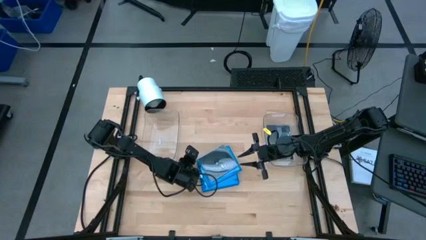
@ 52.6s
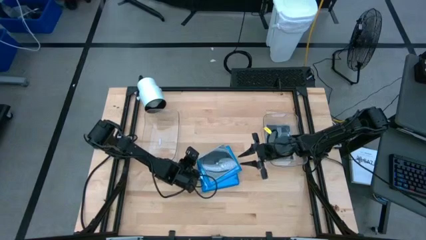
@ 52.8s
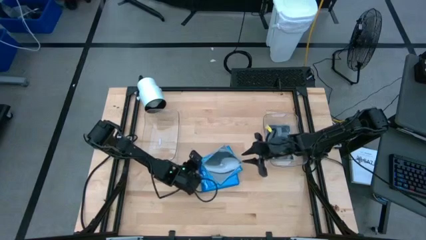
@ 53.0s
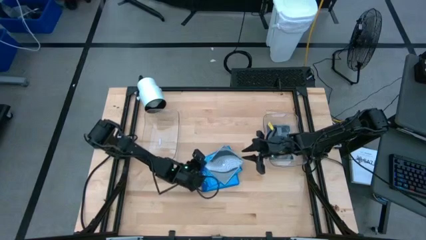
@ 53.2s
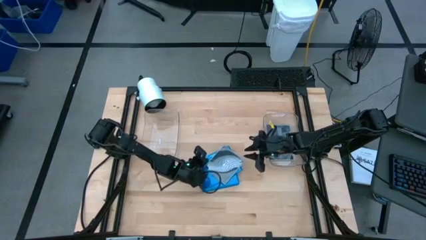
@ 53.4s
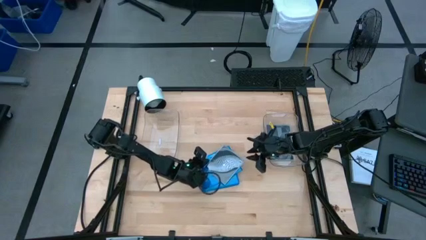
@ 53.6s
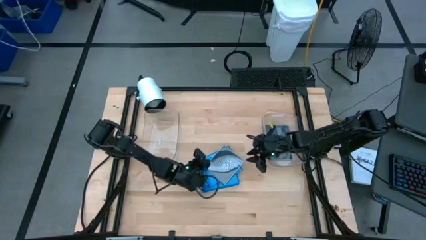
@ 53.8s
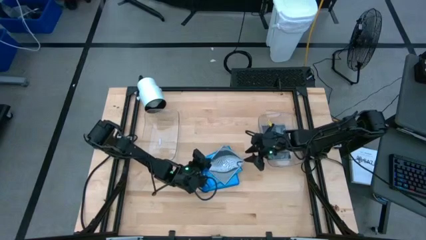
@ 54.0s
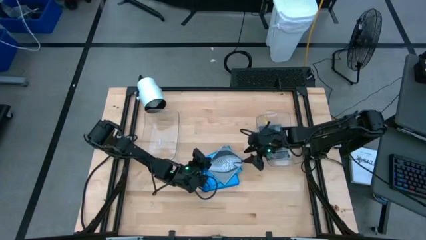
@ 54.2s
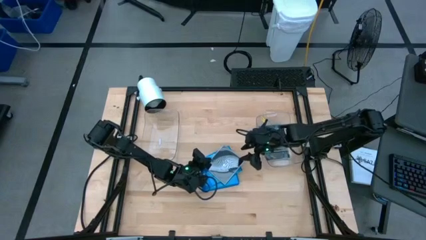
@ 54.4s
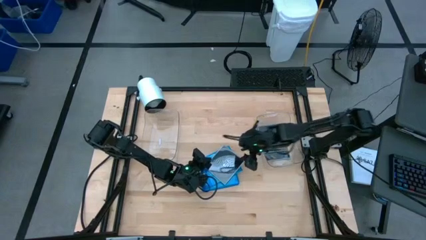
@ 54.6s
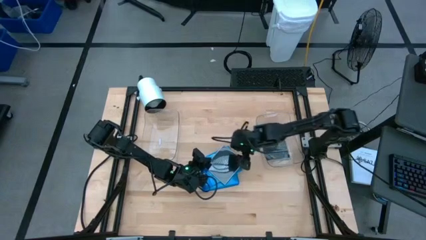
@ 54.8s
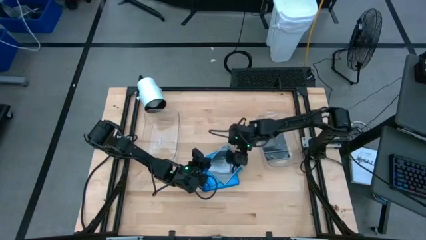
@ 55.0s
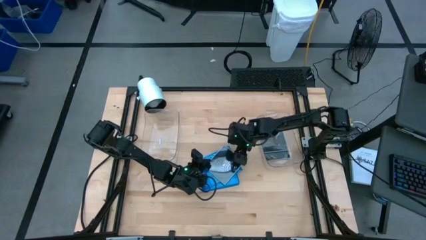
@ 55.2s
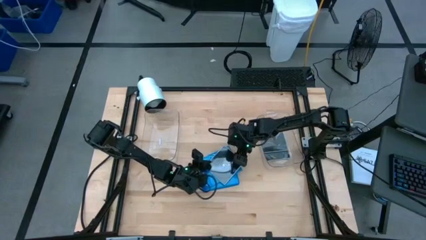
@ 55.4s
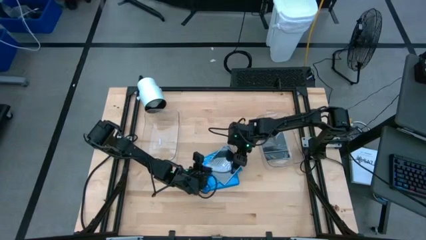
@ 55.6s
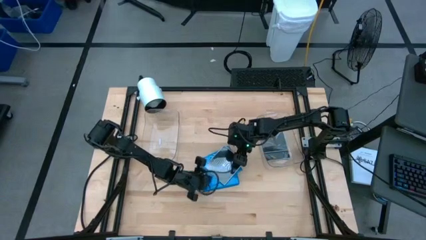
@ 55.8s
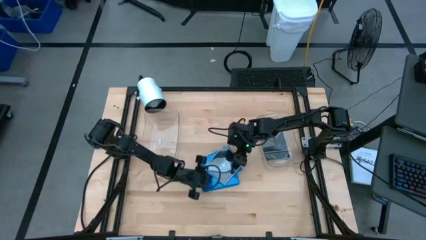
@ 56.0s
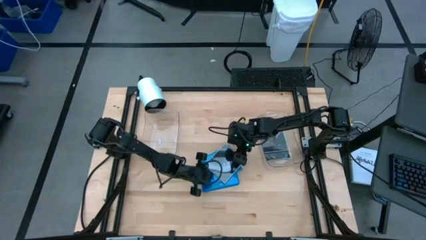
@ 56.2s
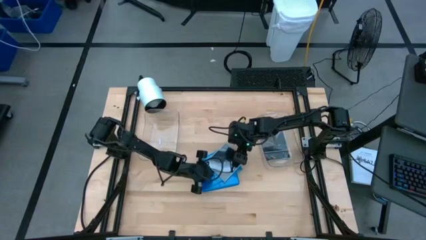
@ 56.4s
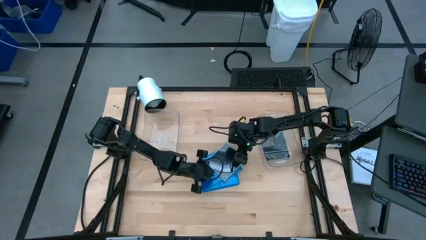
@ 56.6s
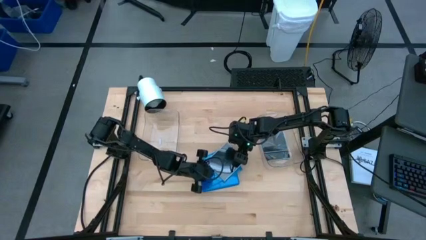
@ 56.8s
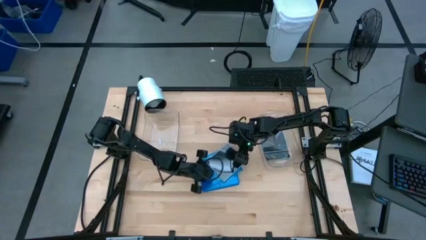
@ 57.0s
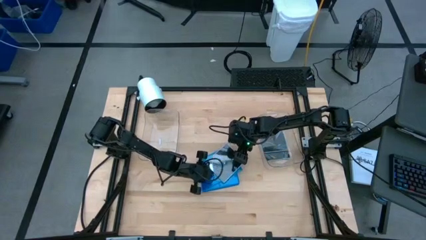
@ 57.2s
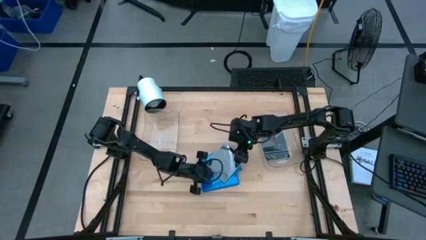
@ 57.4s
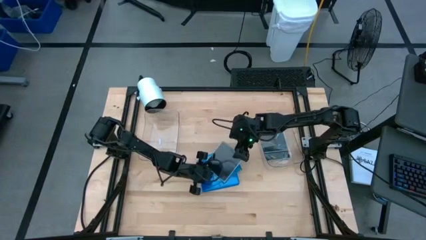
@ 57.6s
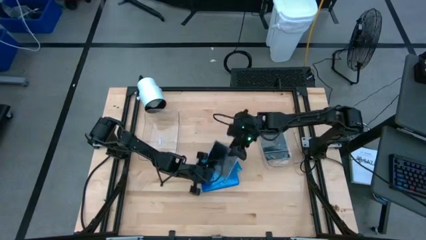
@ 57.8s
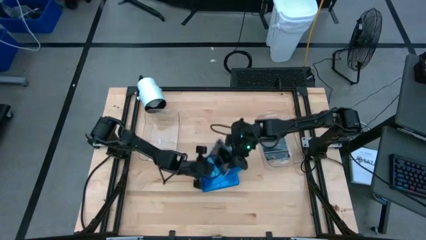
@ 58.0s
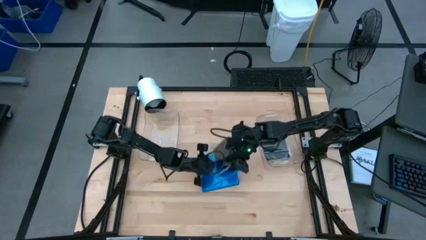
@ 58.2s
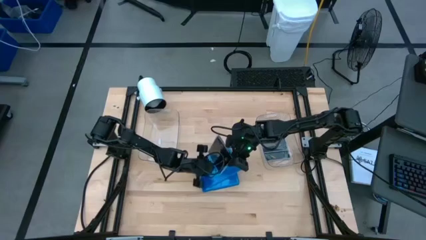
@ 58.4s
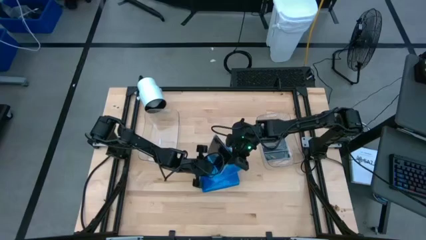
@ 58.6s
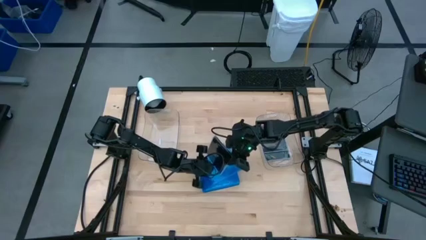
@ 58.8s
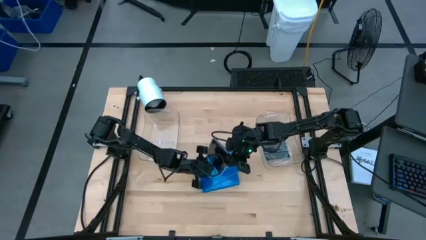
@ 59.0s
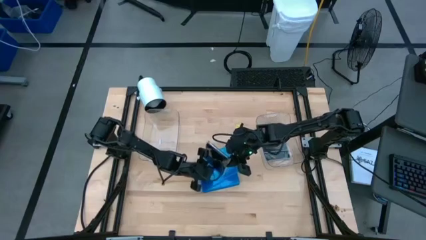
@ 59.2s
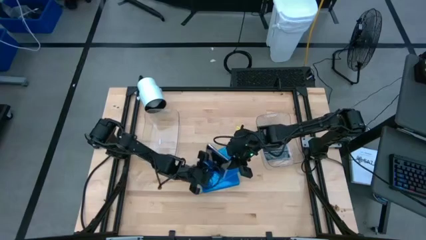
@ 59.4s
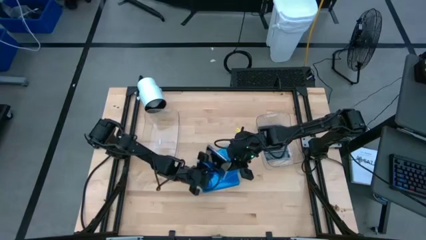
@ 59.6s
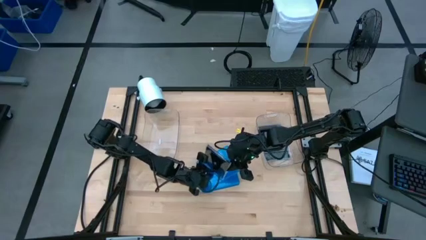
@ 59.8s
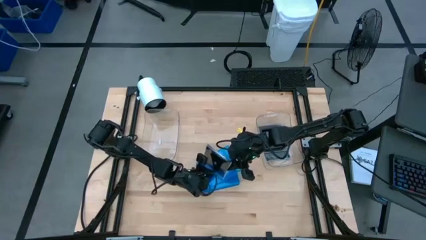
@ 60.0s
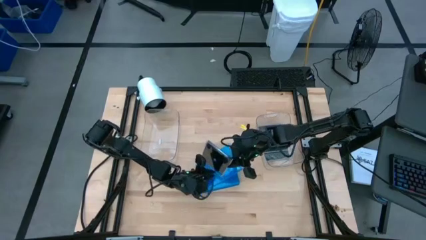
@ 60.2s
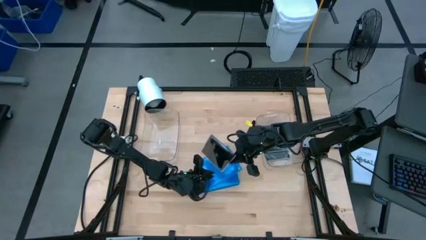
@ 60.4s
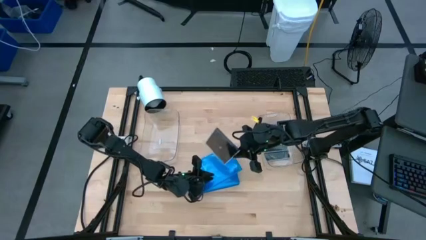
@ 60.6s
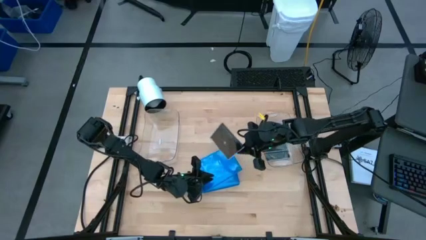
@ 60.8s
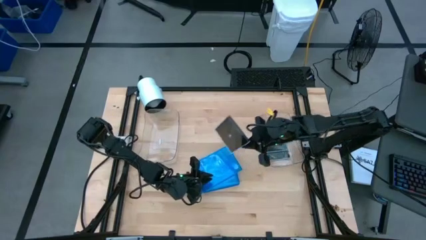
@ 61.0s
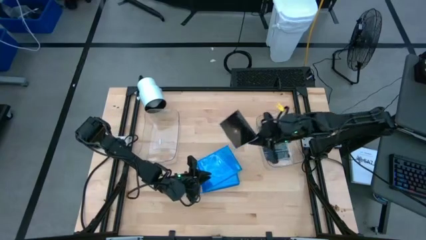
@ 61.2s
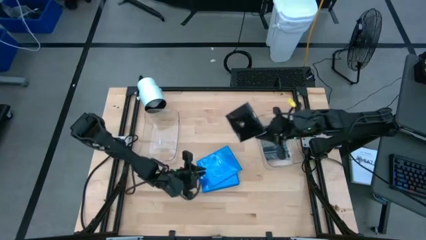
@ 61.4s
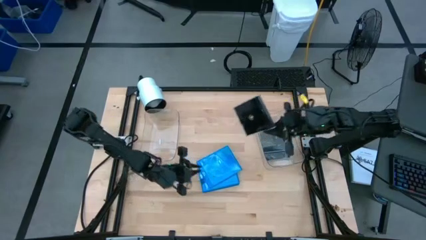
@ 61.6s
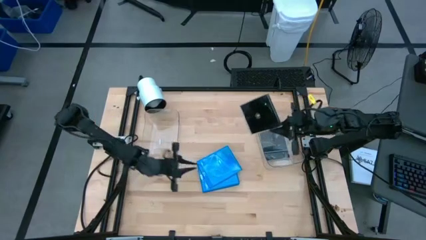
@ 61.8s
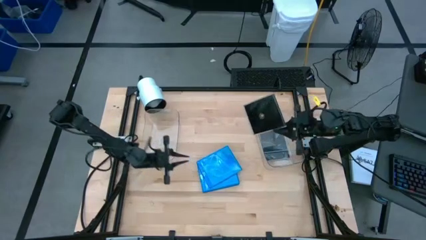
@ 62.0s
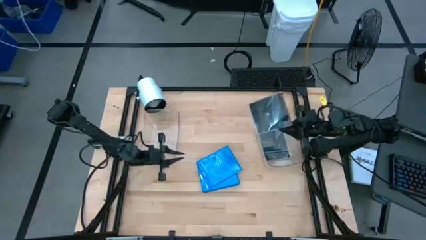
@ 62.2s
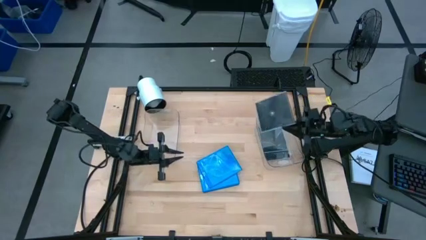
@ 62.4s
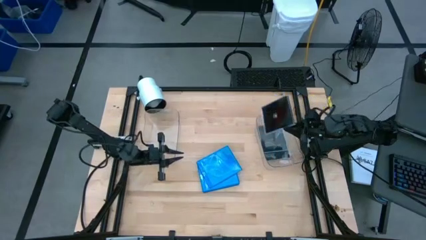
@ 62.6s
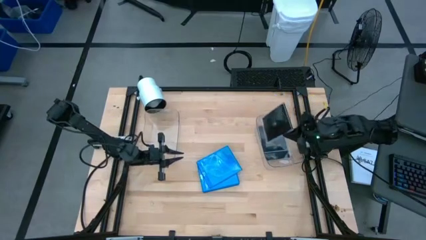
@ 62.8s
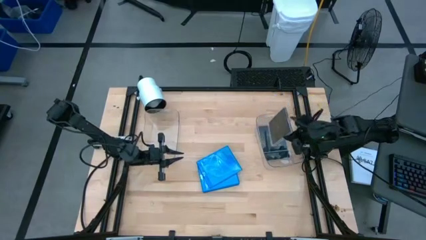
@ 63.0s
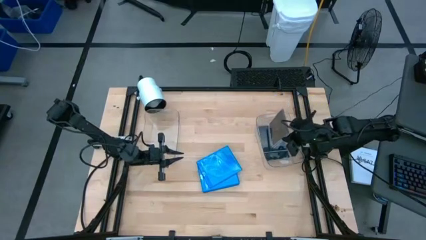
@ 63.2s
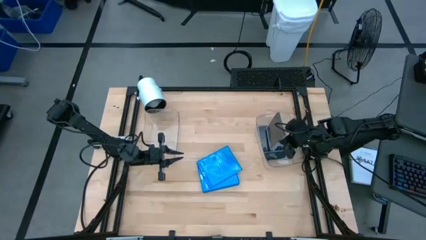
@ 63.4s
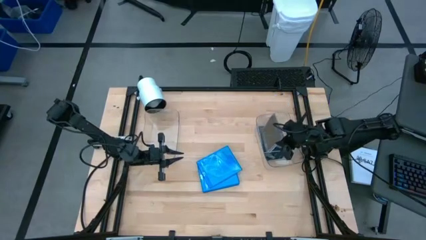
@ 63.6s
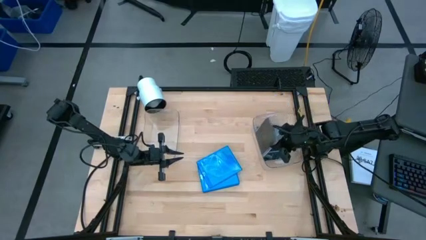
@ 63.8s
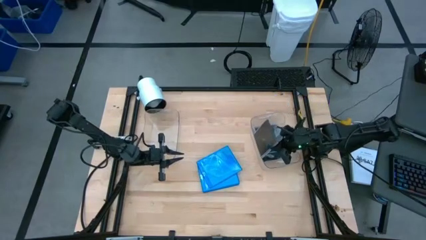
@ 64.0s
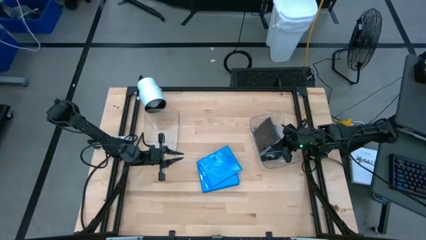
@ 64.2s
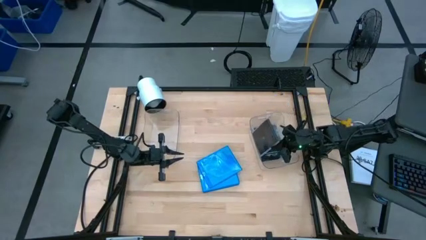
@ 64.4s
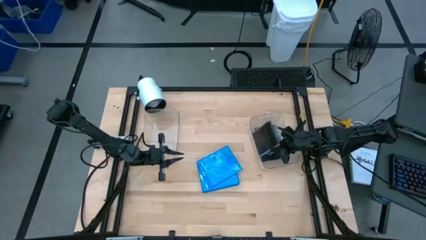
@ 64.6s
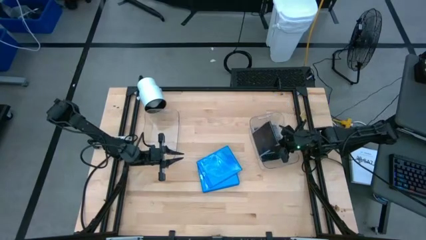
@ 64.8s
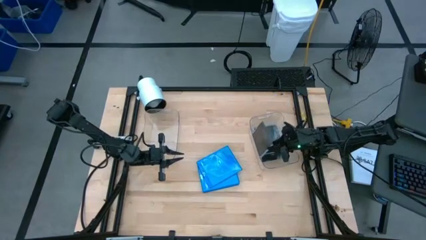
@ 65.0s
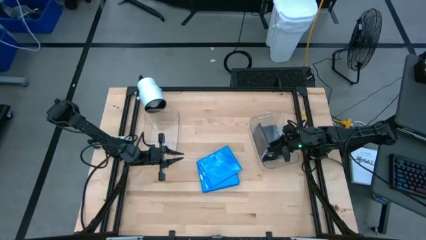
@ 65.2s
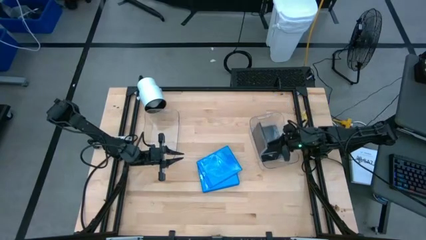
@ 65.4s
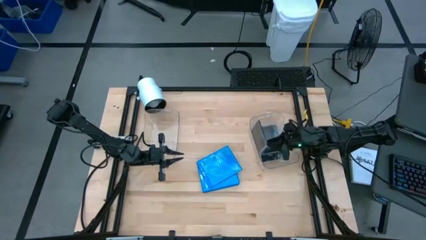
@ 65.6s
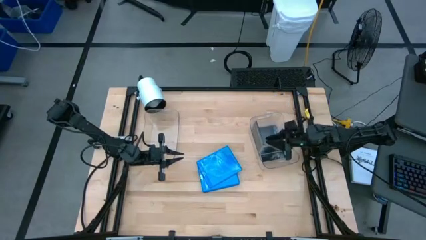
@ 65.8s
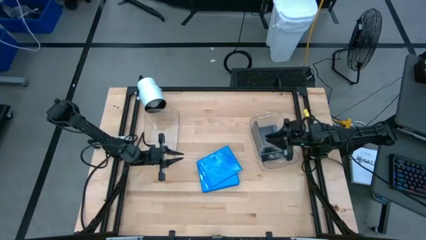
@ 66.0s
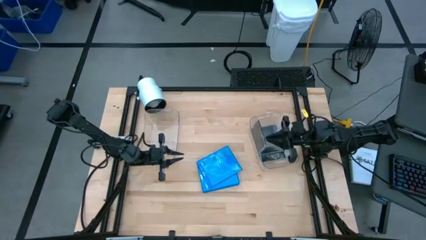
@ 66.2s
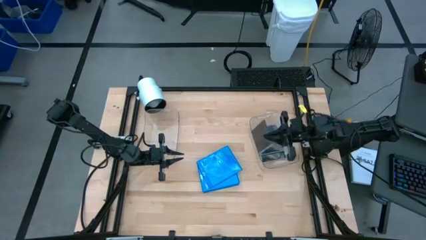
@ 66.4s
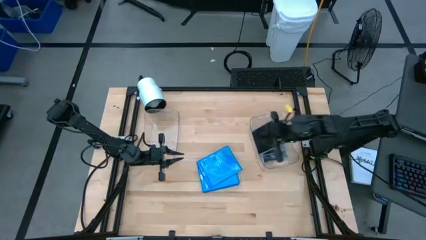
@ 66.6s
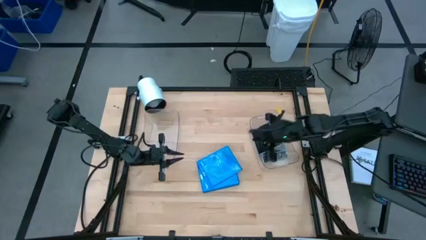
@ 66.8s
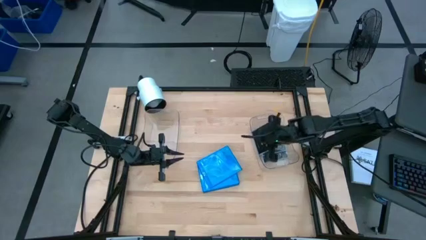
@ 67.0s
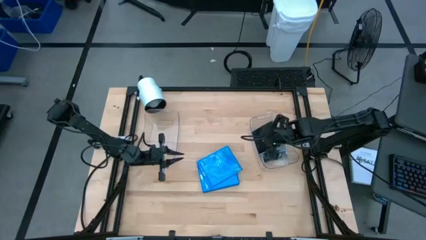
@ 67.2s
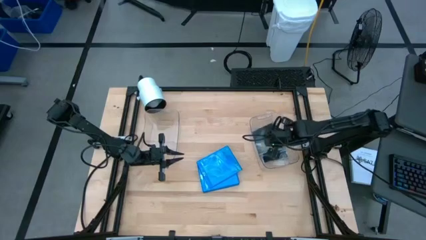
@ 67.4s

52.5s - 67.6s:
Task: Pick & place jewel cases by type
Put the black CD case into the right transparent bin
